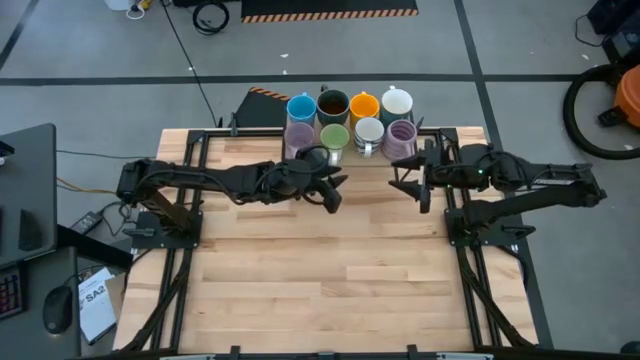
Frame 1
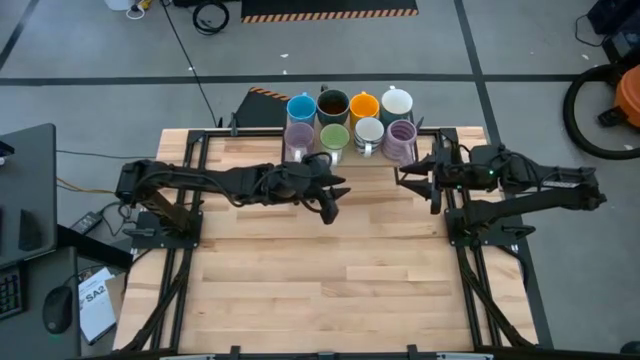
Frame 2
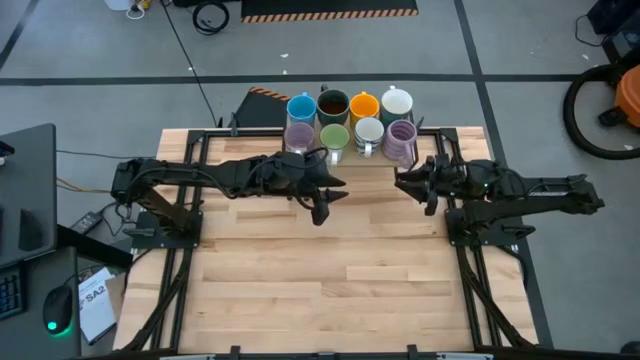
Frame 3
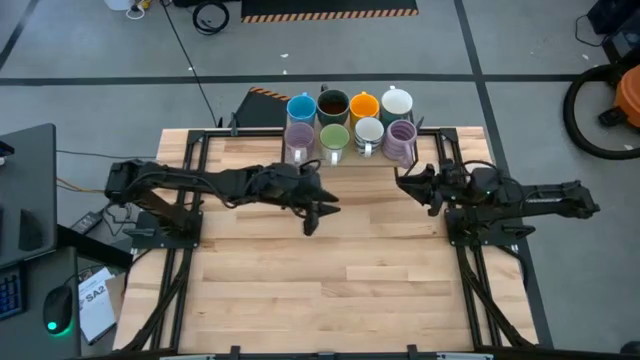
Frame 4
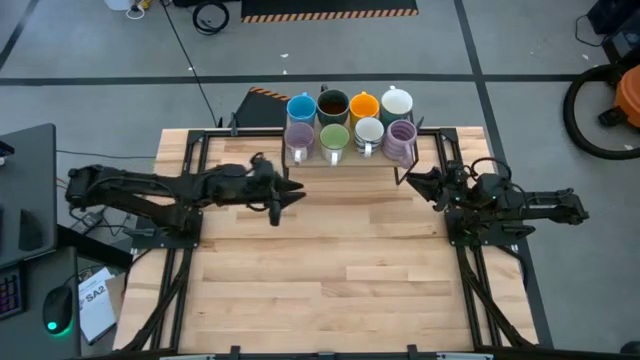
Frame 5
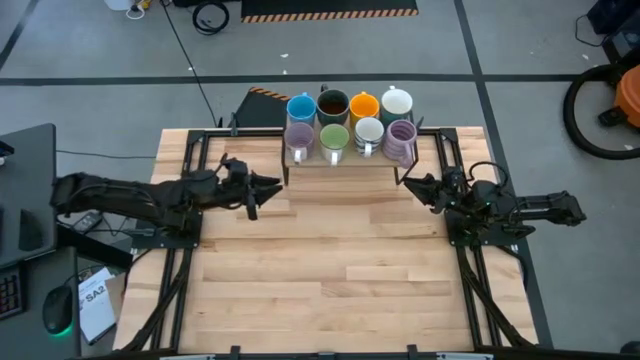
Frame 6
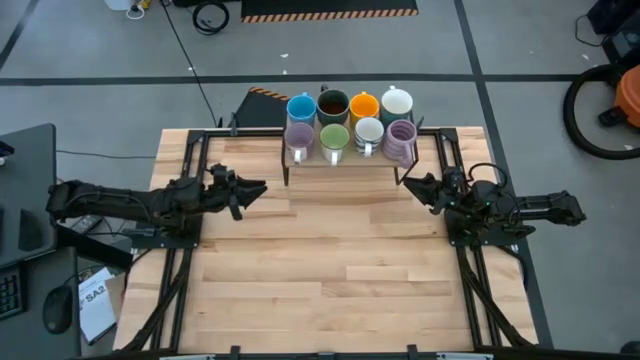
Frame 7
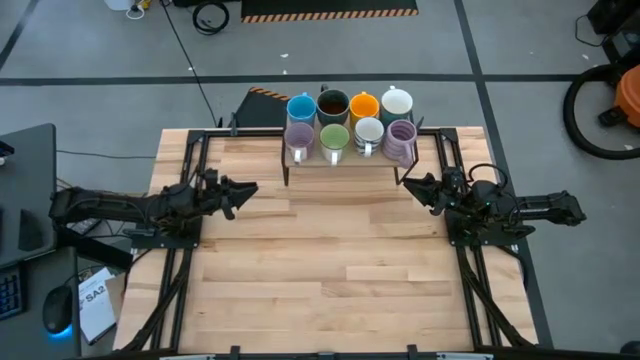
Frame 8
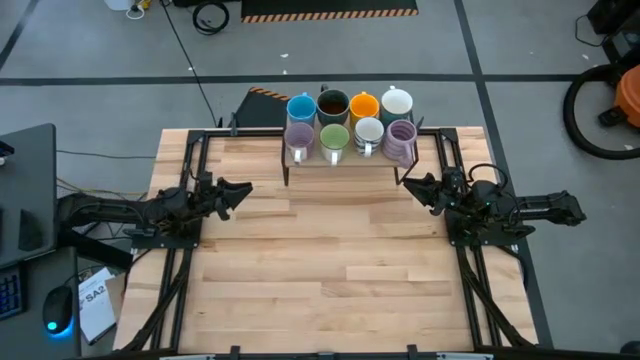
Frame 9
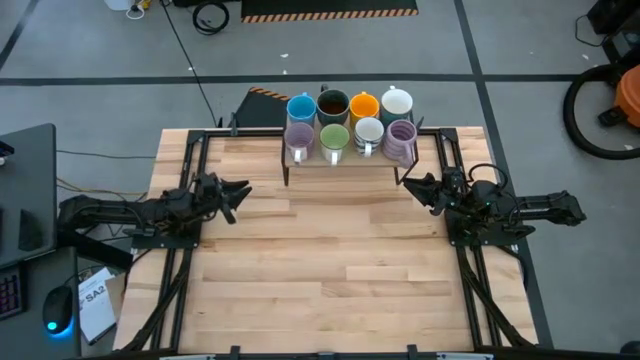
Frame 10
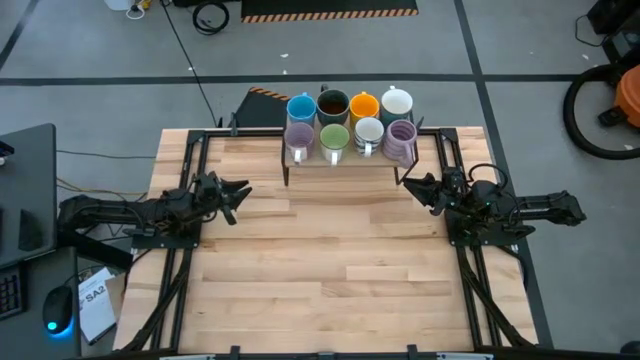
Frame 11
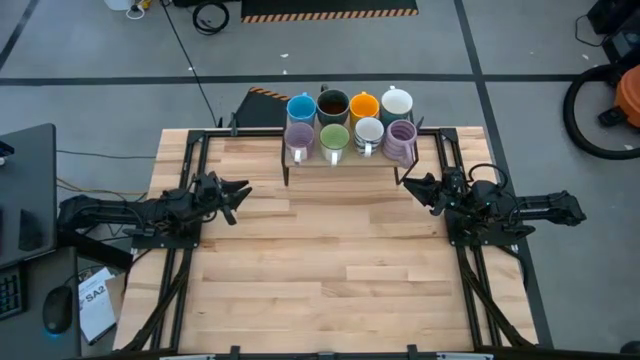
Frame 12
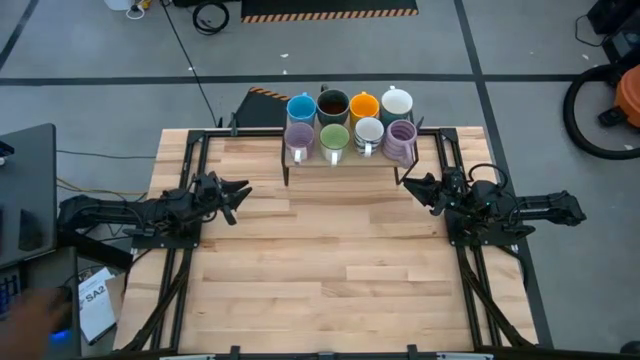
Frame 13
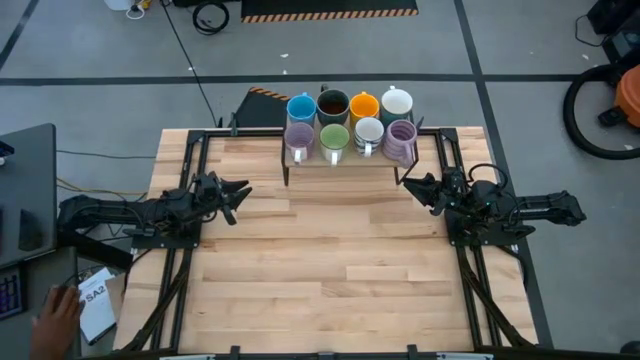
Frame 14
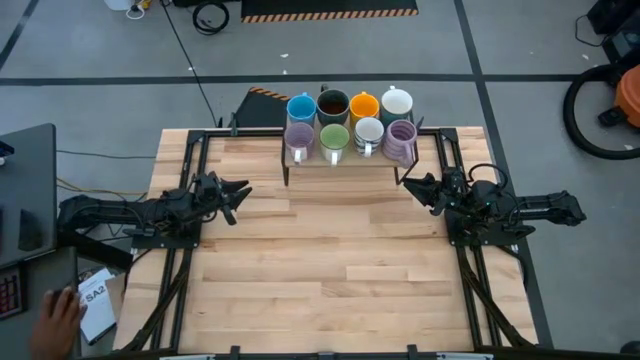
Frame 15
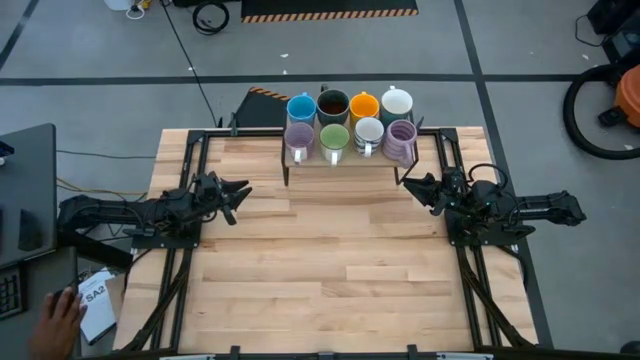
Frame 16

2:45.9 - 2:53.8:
Task: Place coffee mugs
Return to Home Position

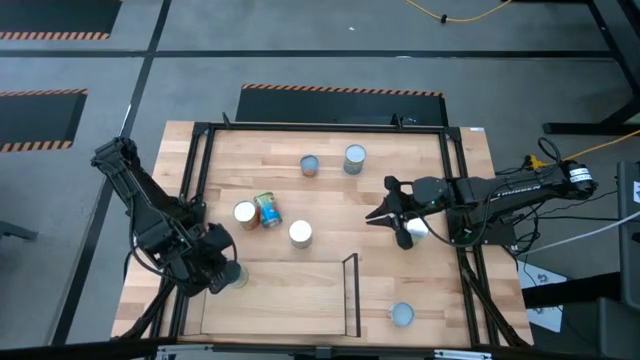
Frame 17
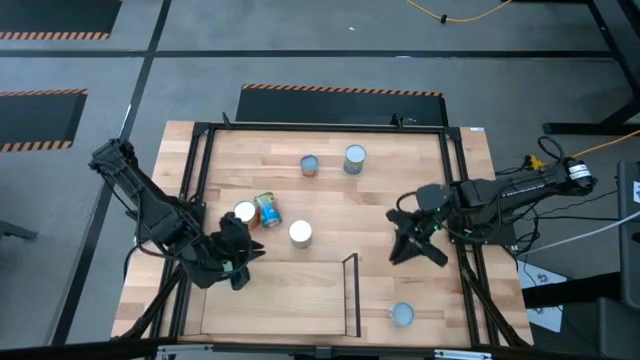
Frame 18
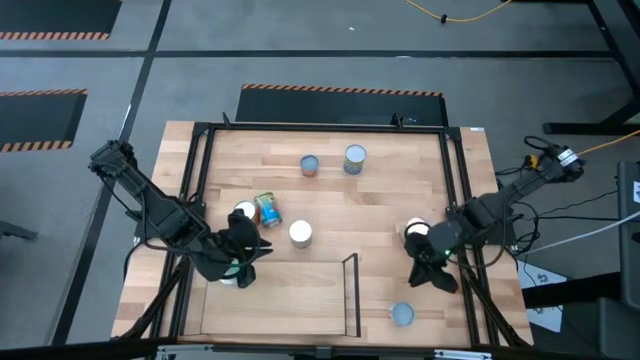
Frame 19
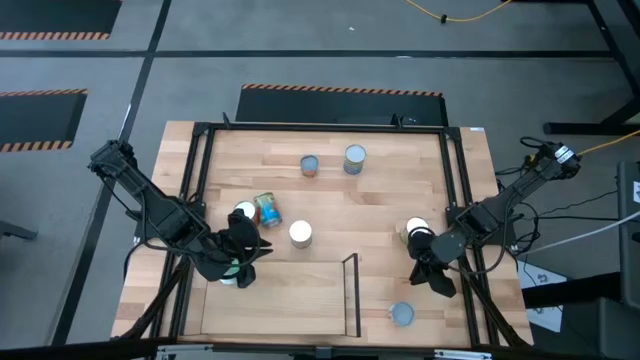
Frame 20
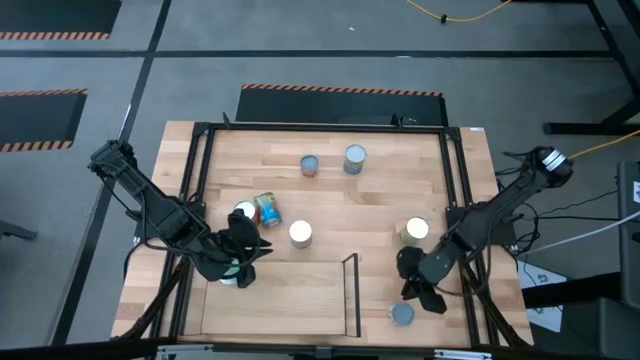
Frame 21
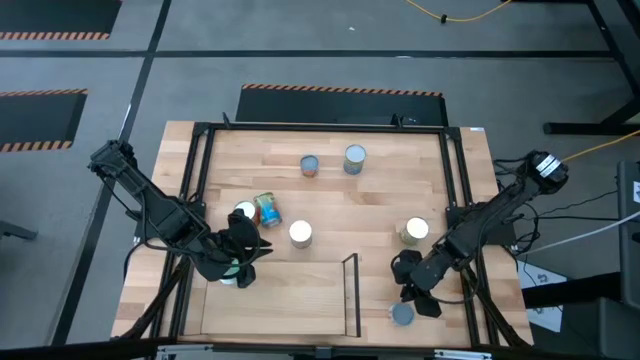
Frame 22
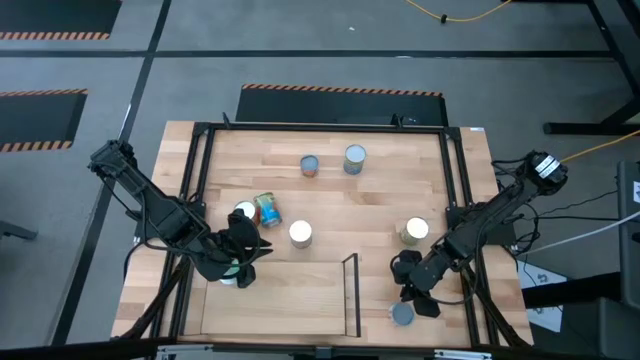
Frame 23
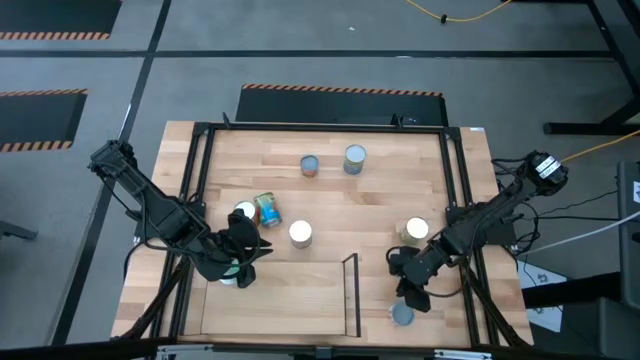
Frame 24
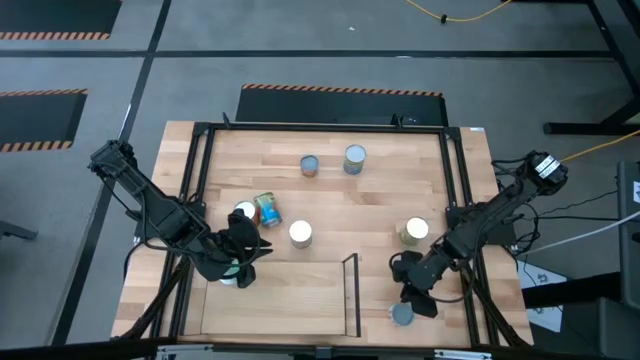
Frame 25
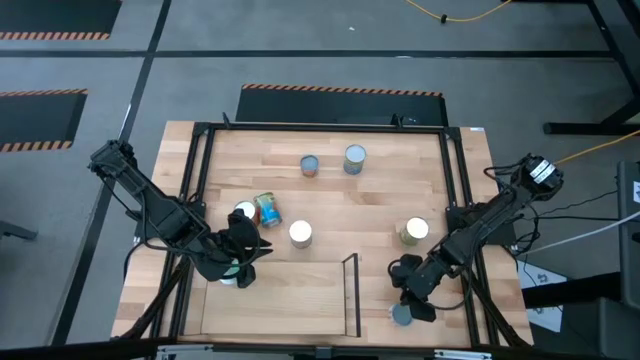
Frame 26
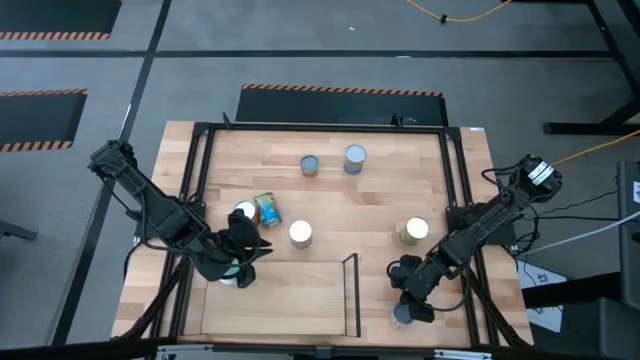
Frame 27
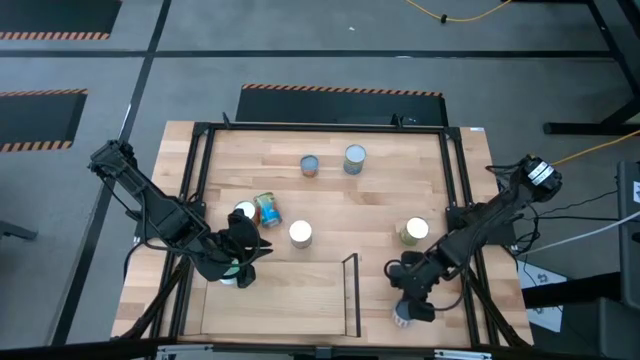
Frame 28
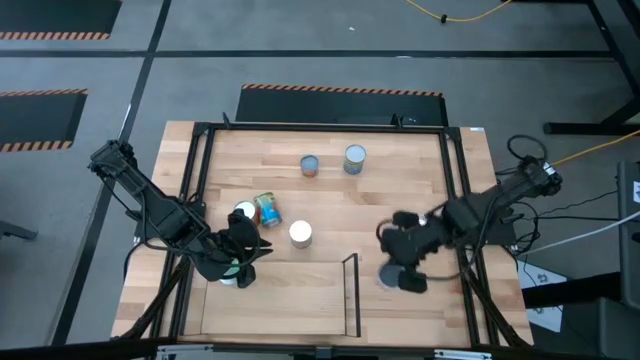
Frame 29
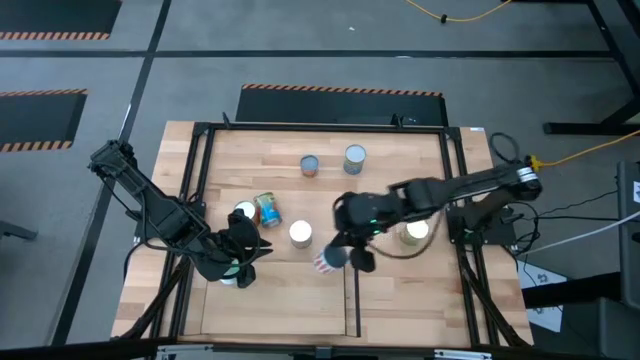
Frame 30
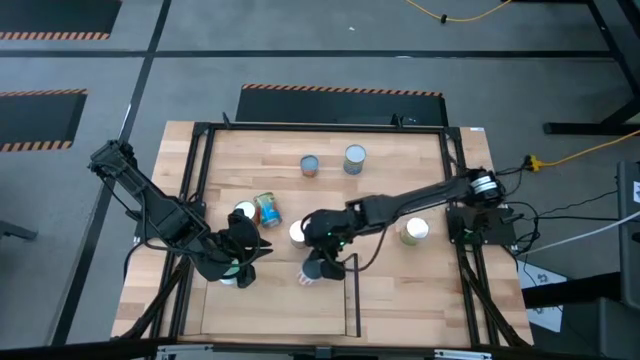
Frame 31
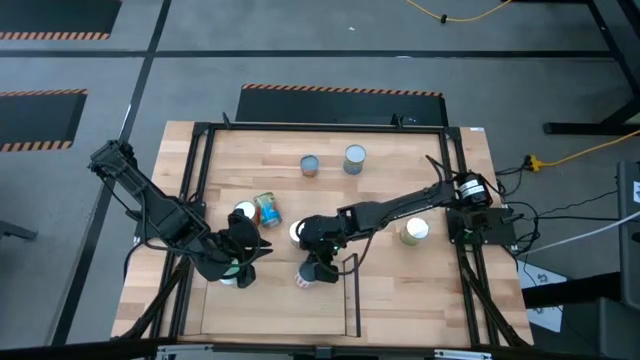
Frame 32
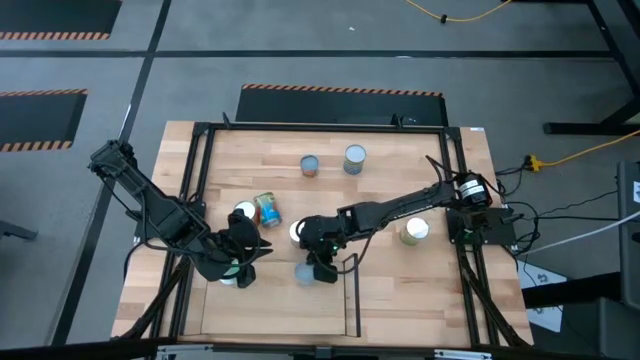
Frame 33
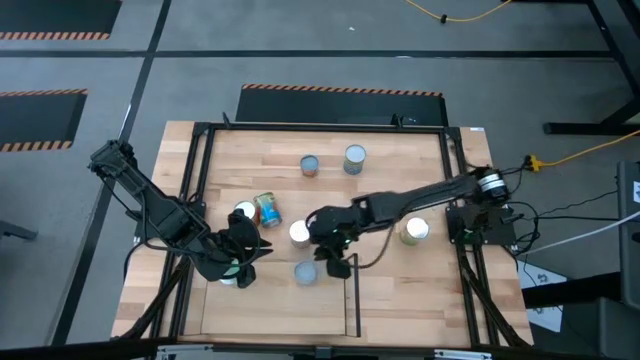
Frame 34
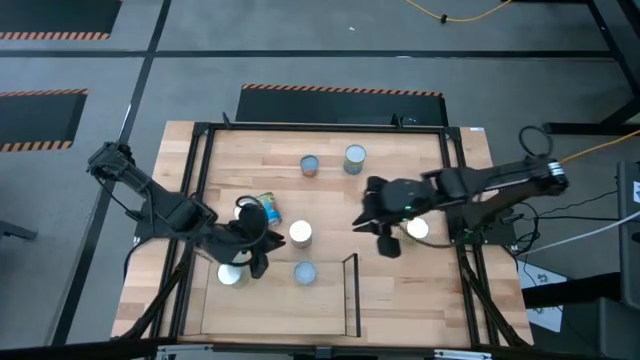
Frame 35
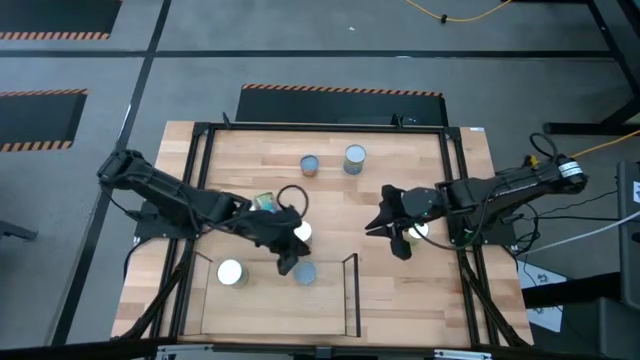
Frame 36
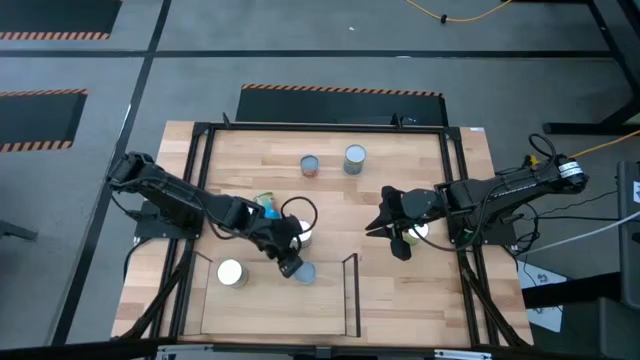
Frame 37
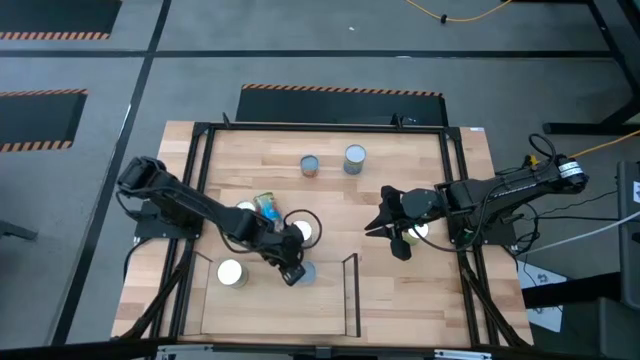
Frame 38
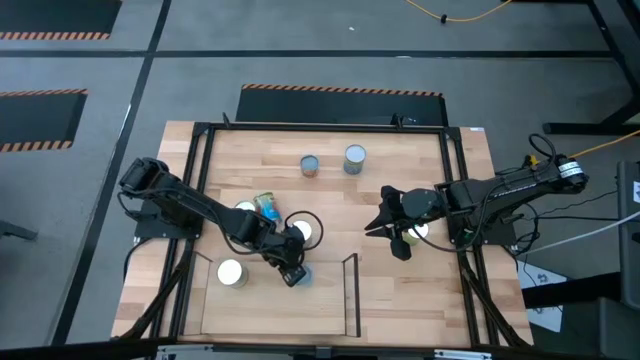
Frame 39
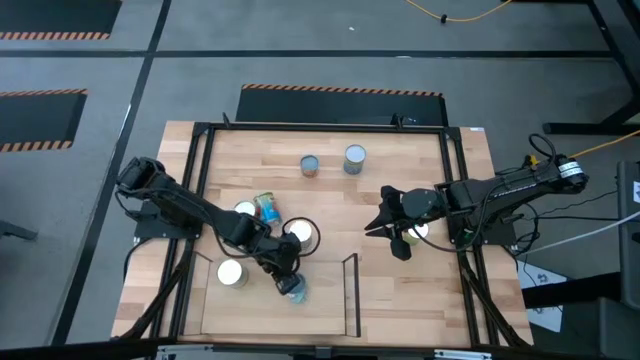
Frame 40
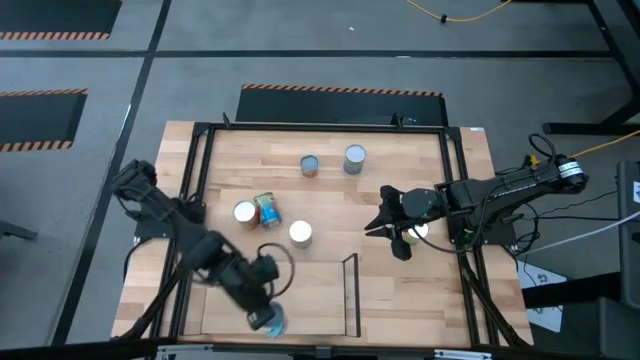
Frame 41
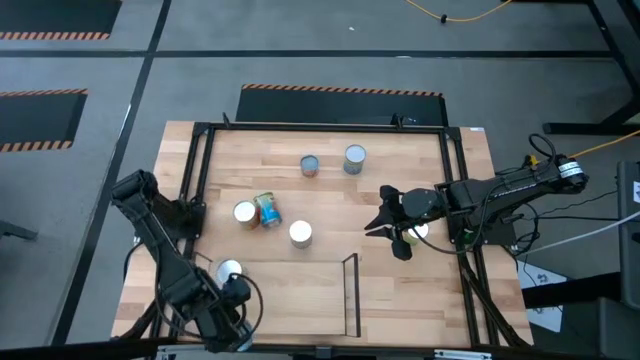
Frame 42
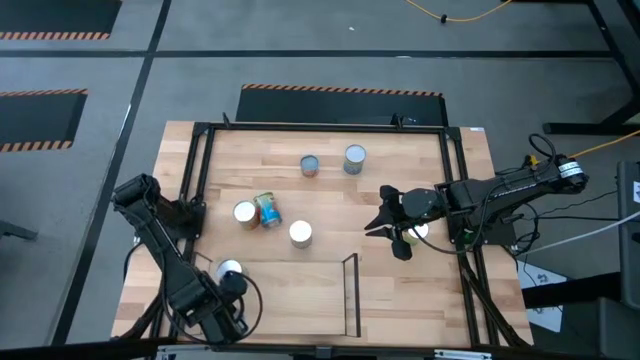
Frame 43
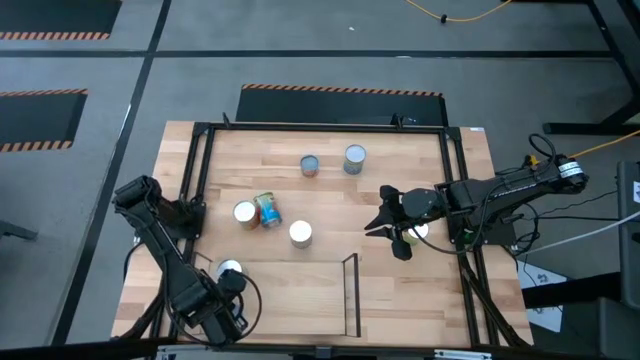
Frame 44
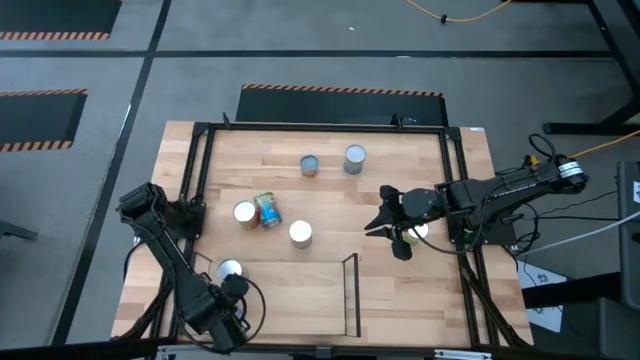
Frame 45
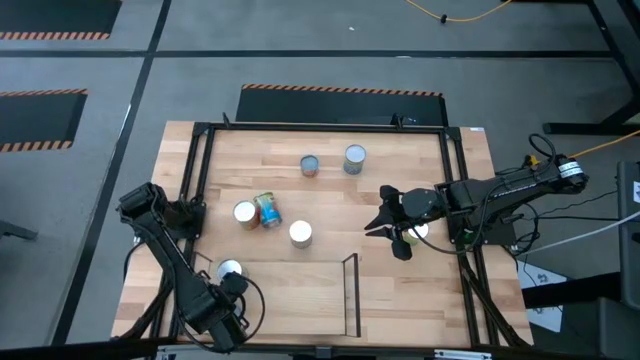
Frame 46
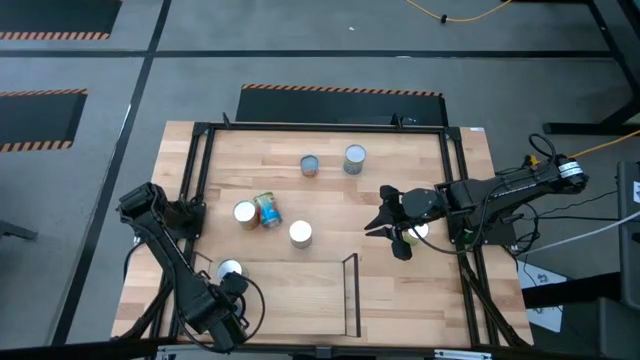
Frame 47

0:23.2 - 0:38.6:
Task: Pick and place cans onto a shelf
Put the small canned carrot on the shelf
